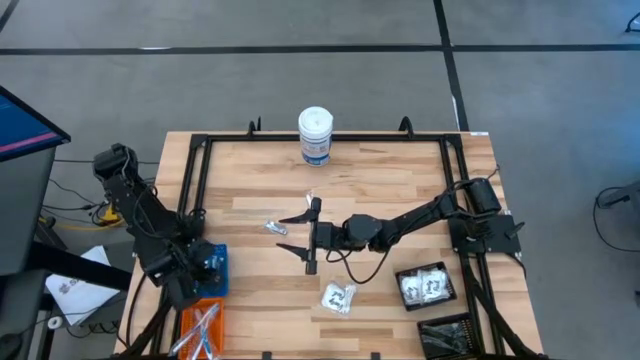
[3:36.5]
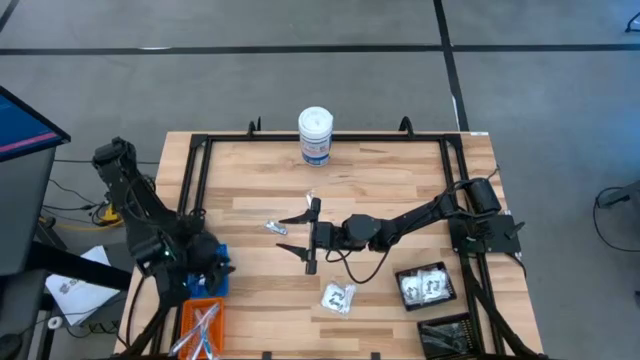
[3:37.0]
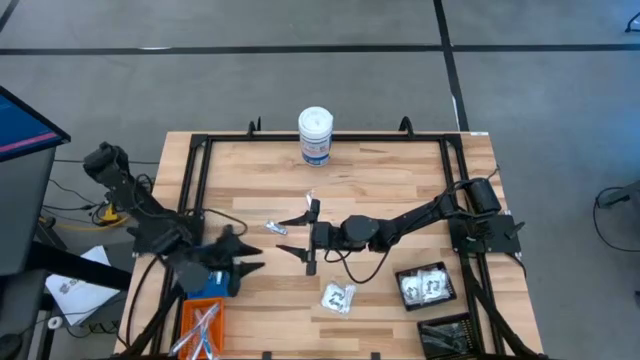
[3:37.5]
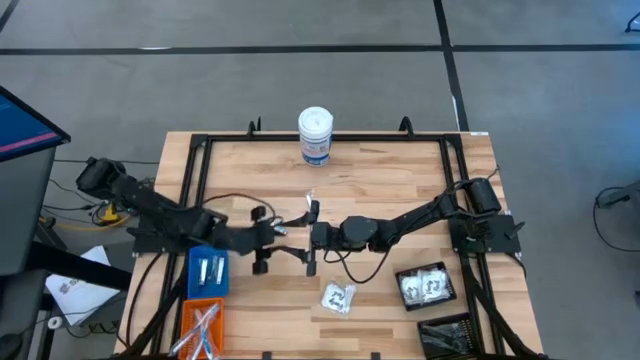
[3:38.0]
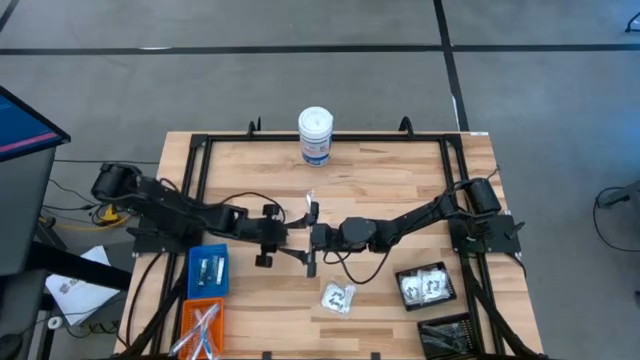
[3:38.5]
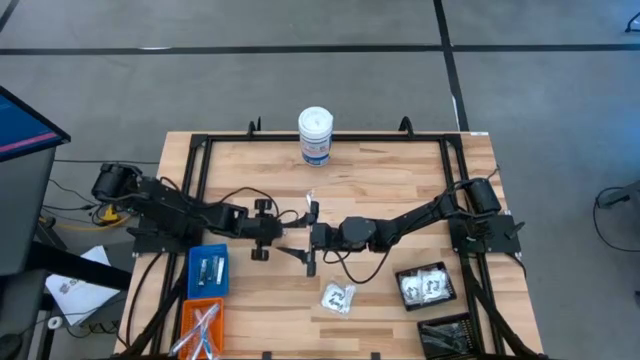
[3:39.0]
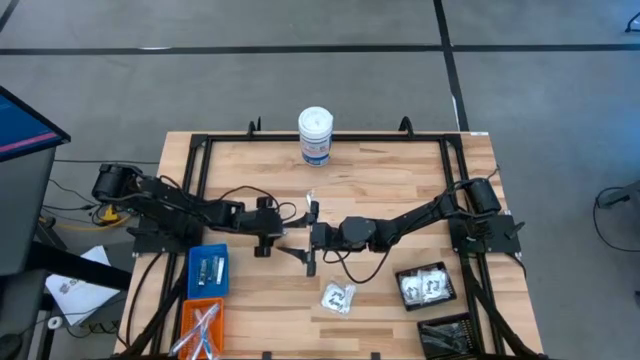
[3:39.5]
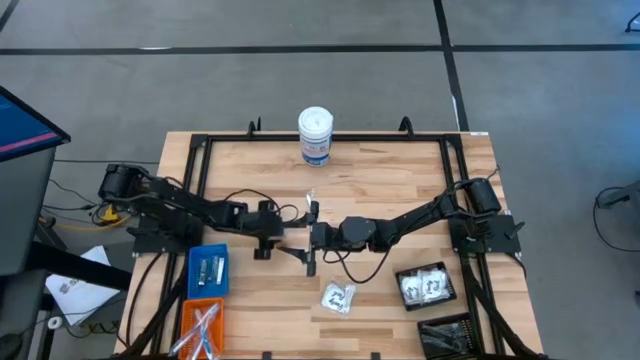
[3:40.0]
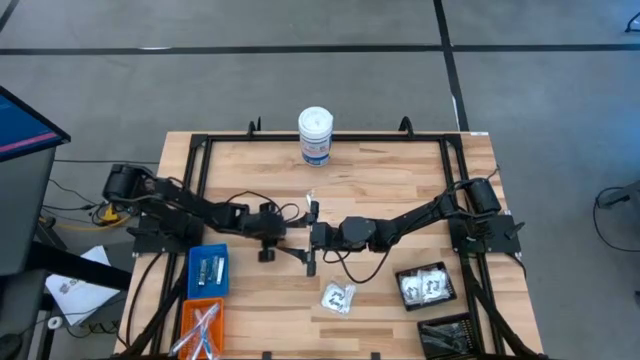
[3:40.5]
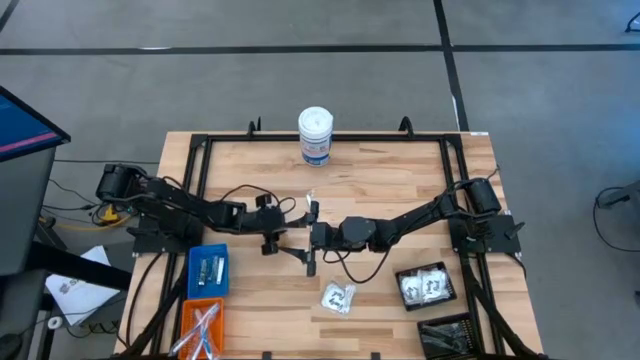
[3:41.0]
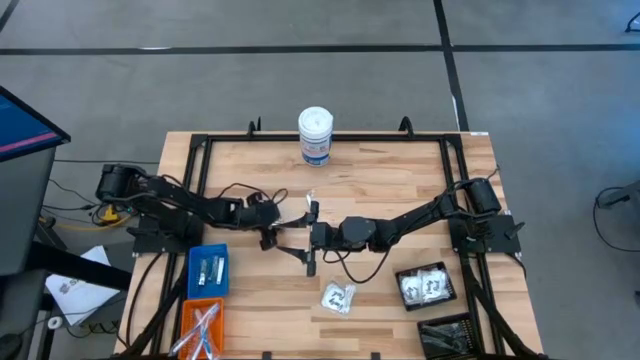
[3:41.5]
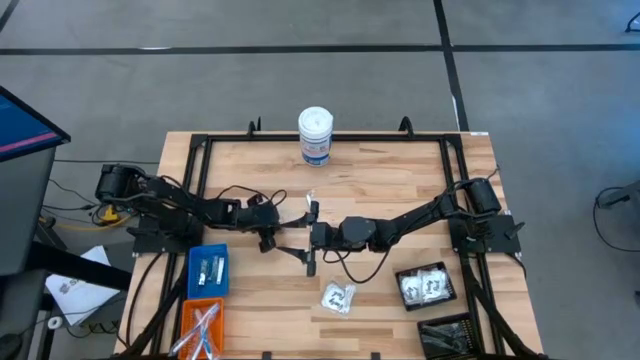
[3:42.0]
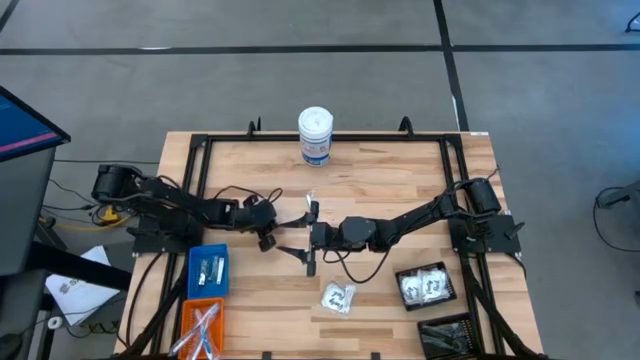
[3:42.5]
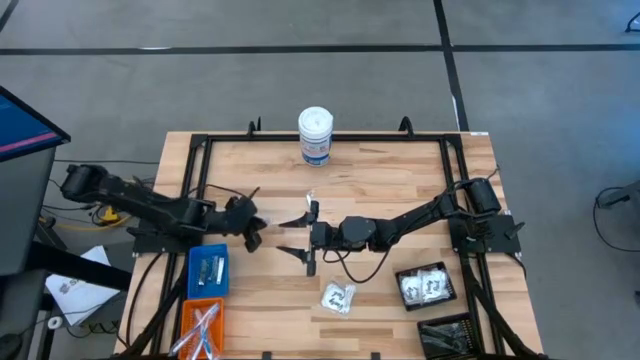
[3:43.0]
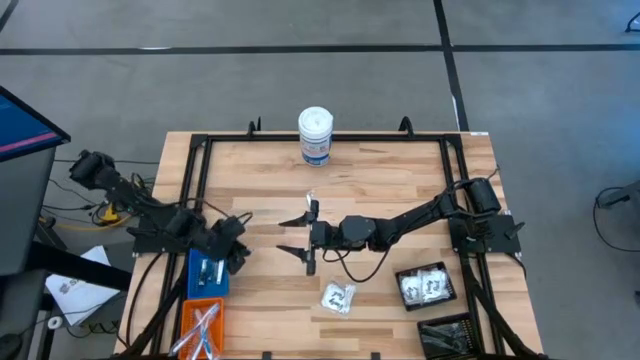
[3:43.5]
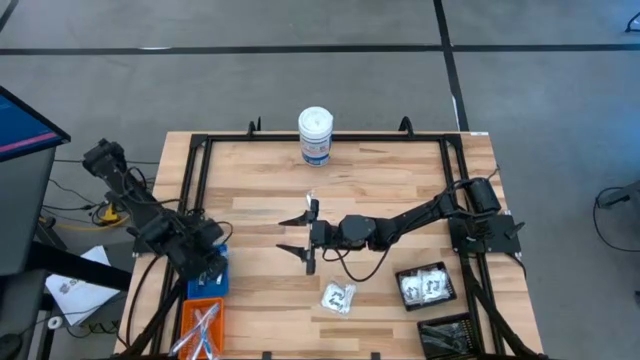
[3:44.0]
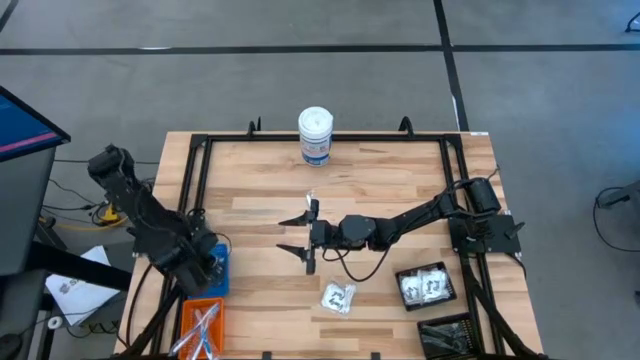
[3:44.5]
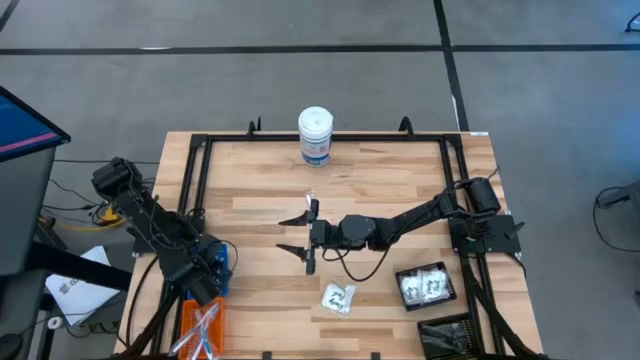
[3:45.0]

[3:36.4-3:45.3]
Task: Pick & Place Travel size toiletries
Put the silver nail clipper into the blue bin

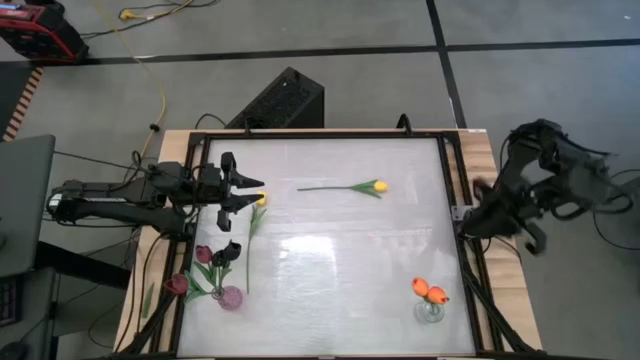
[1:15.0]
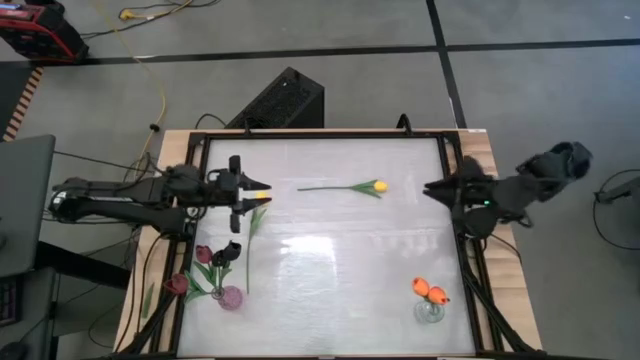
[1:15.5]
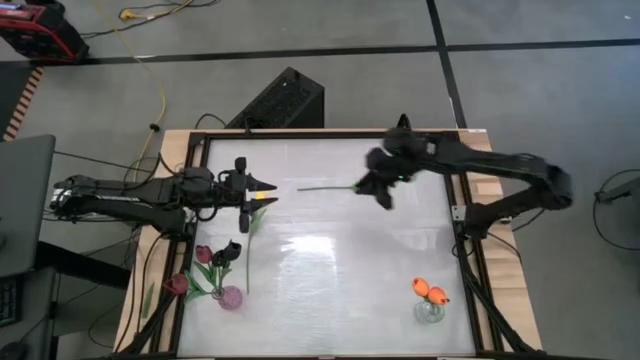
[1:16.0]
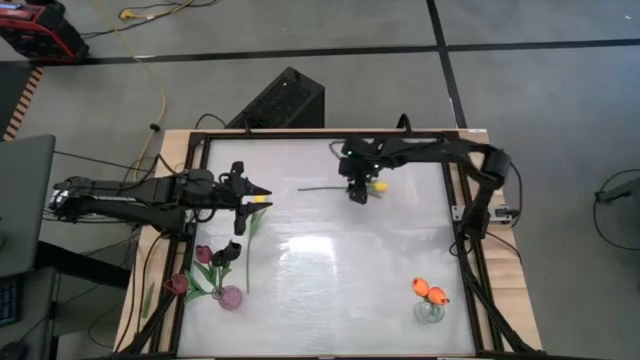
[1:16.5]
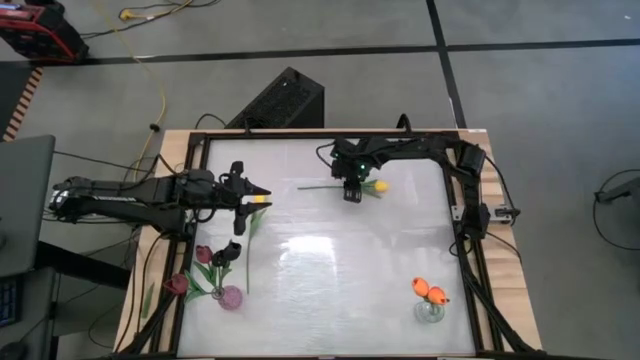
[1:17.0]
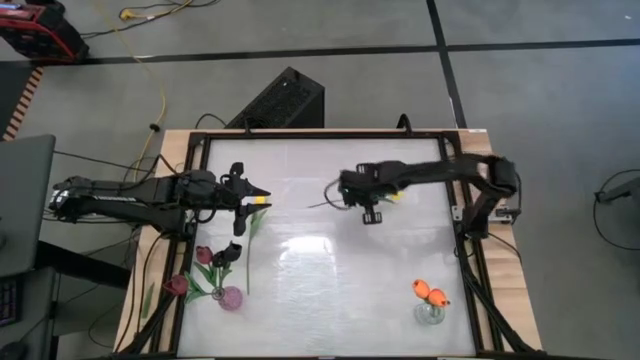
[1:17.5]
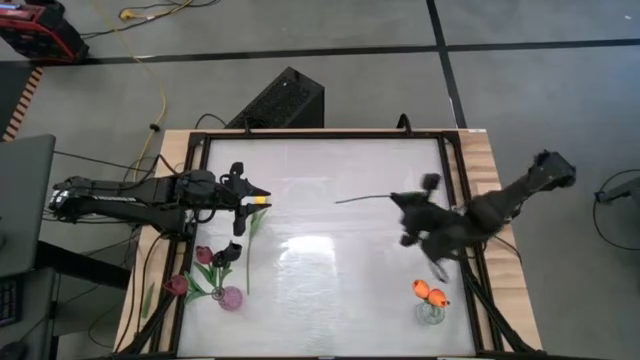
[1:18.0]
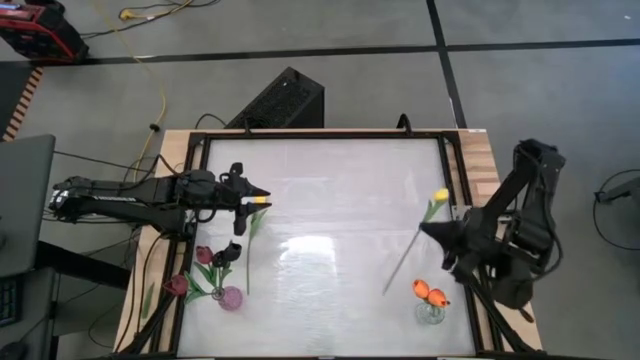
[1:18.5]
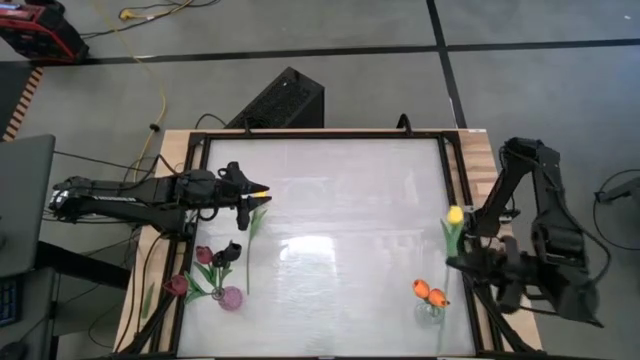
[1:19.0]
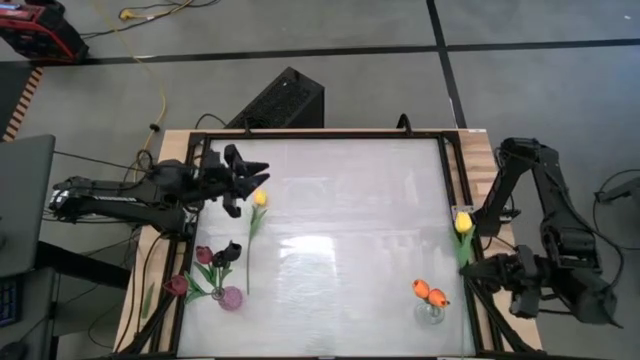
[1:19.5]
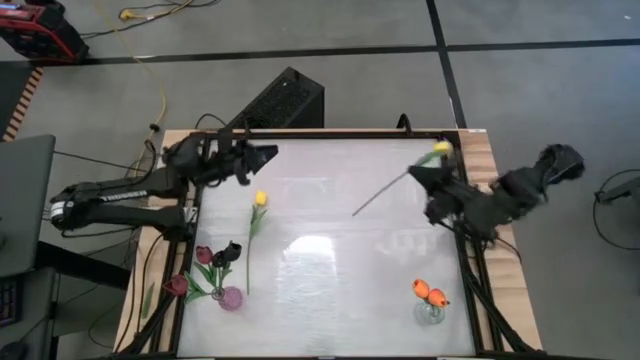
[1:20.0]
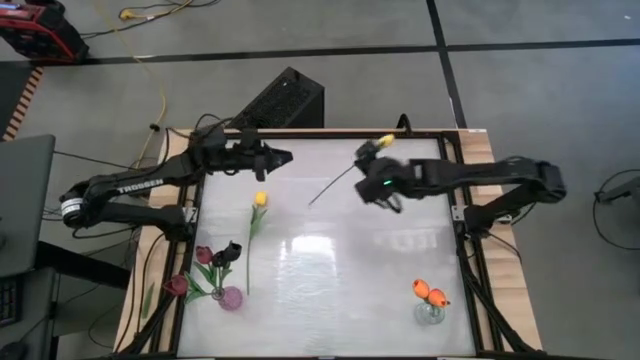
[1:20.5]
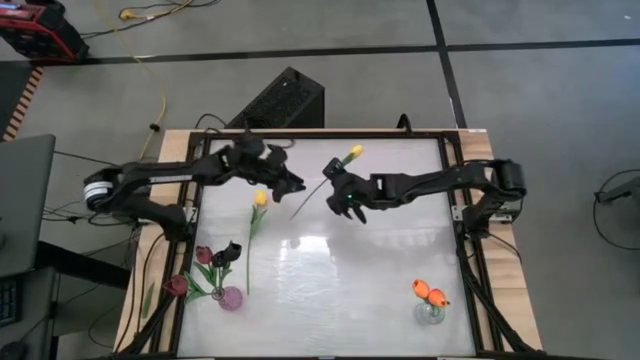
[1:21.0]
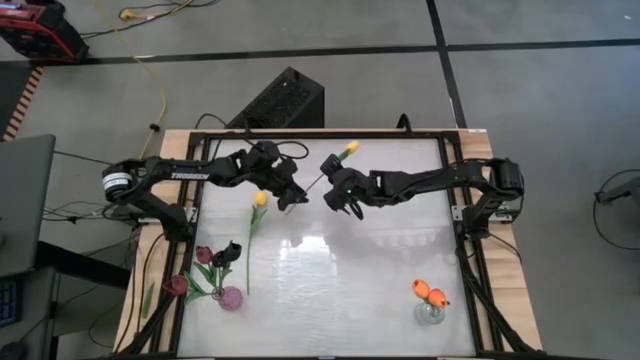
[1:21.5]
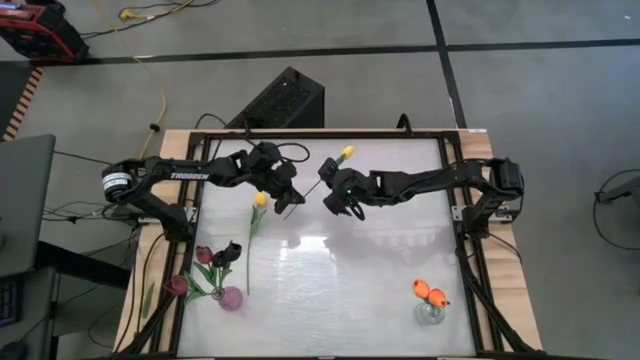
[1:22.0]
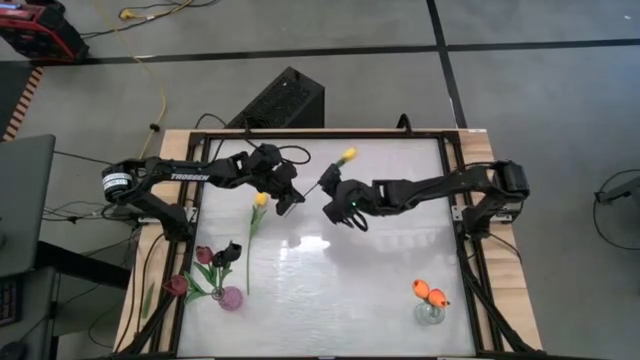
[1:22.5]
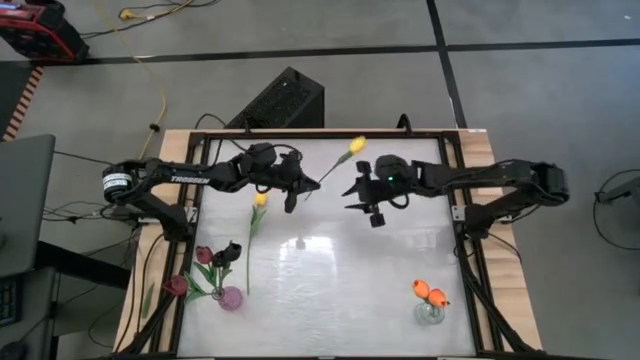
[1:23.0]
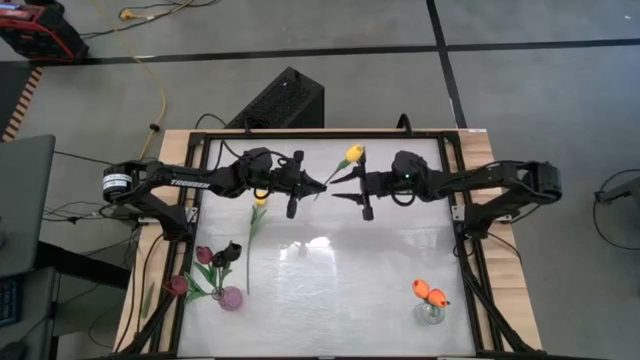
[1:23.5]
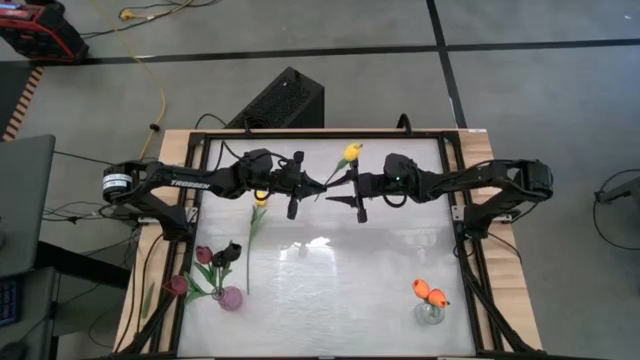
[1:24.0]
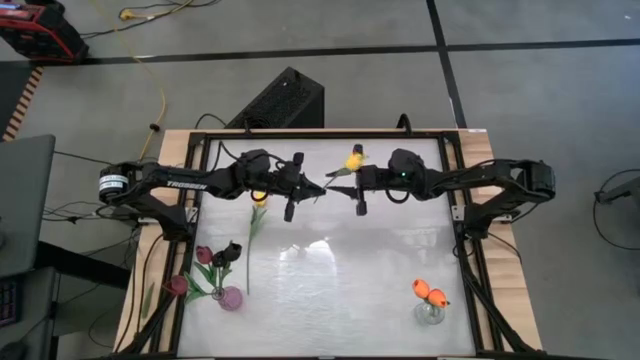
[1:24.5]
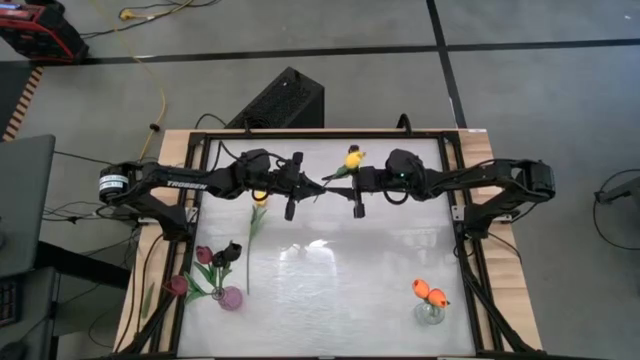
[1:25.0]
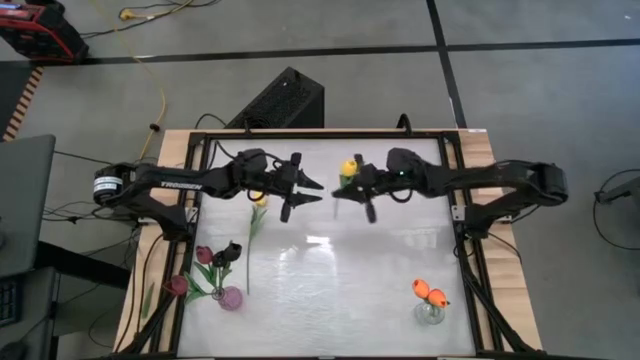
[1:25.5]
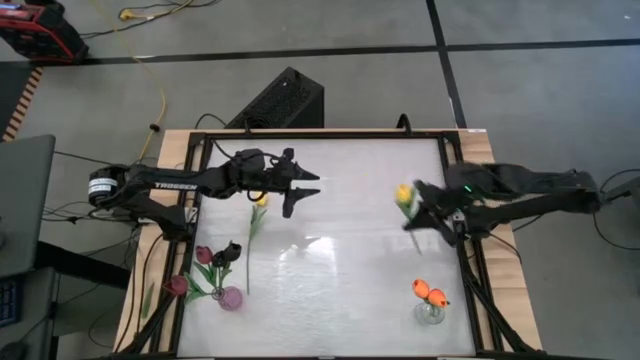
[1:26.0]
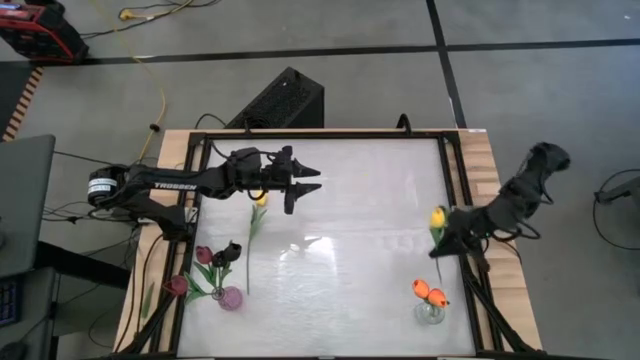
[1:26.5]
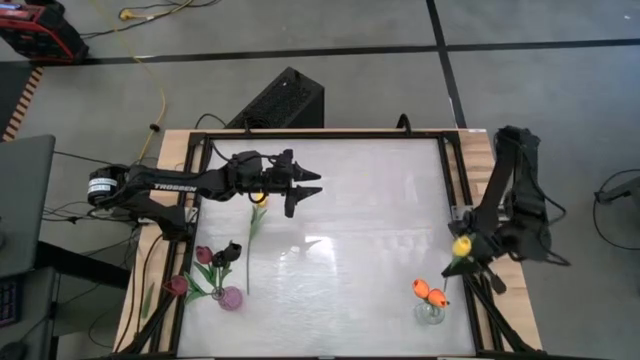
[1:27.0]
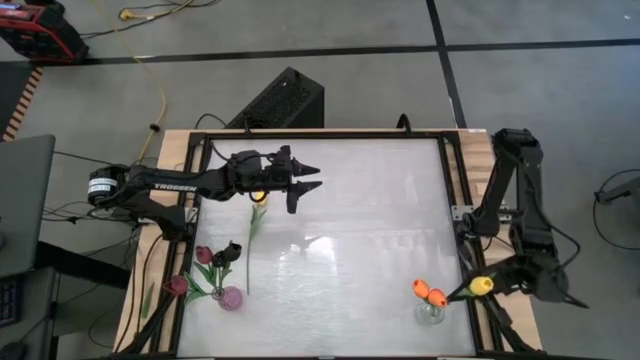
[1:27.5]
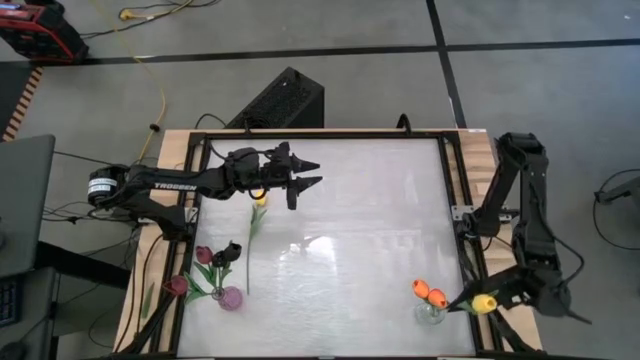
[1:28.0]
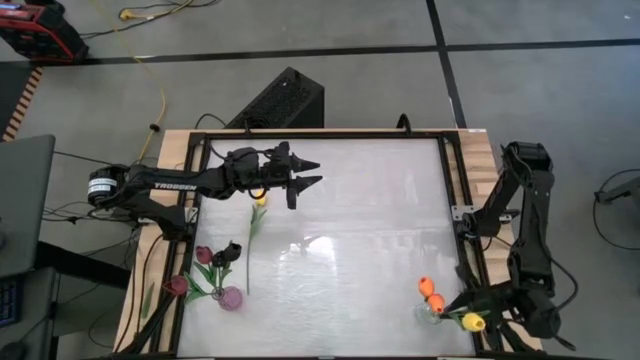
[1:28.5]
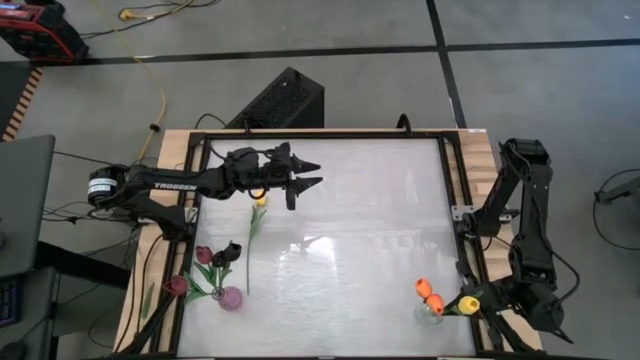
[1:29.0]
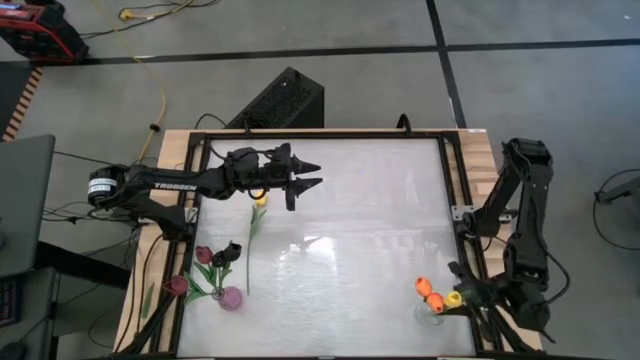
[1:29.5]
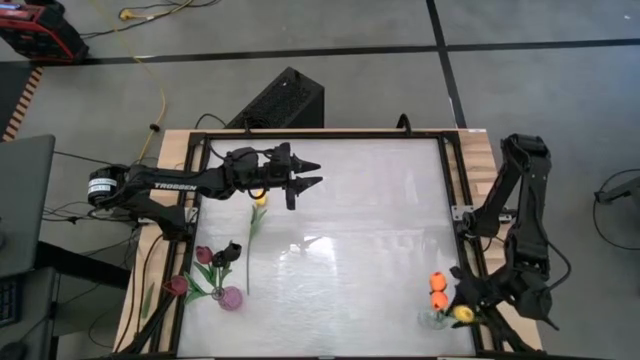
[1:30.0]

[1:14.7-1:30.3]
Task: Sort flowers into vase by color
Put the top yellow flower into the transparent flower vase
